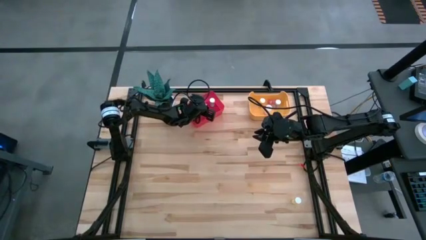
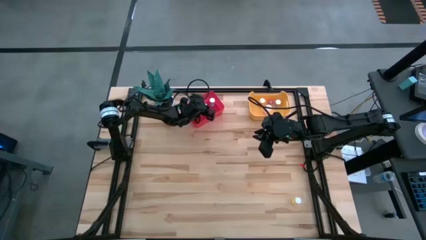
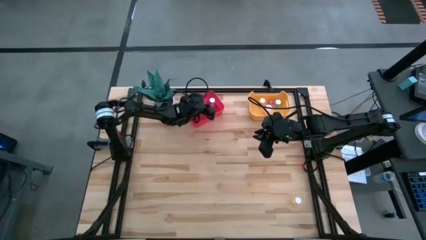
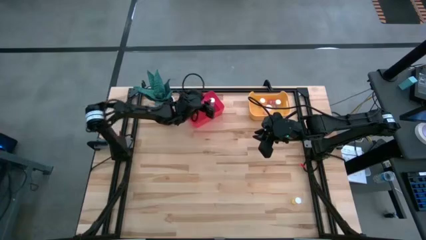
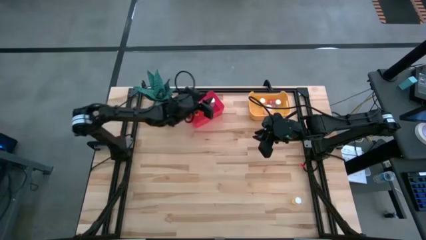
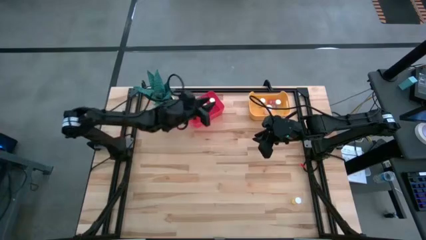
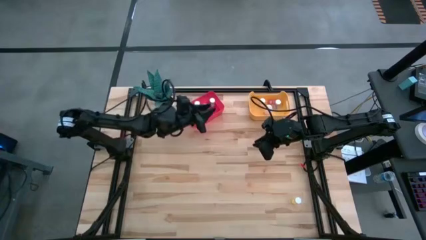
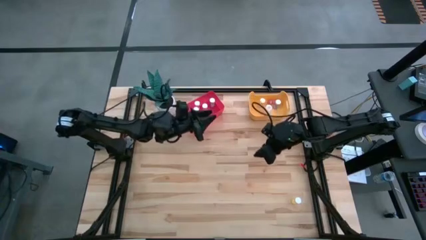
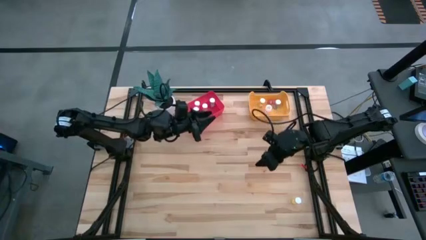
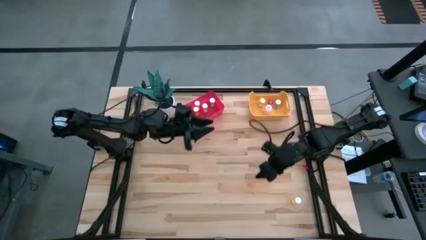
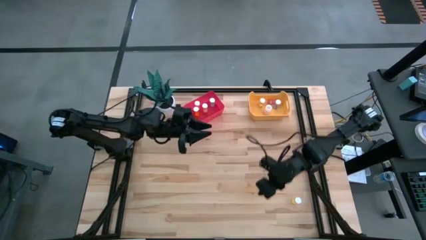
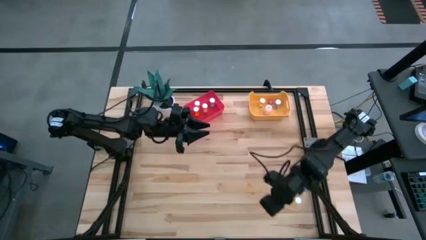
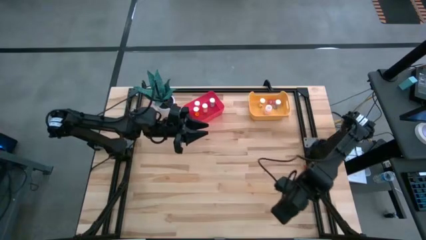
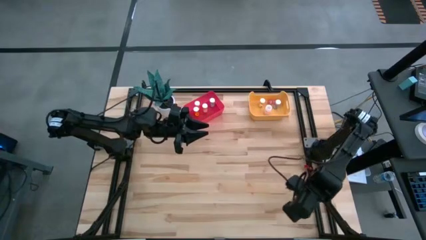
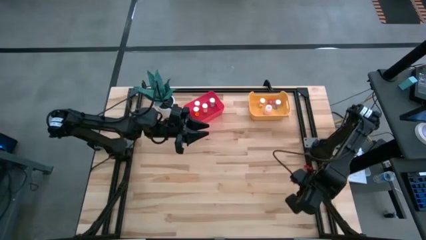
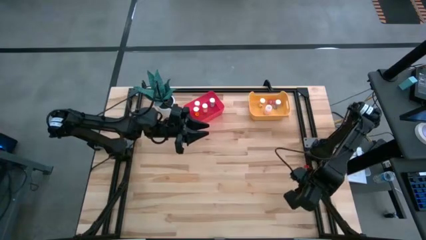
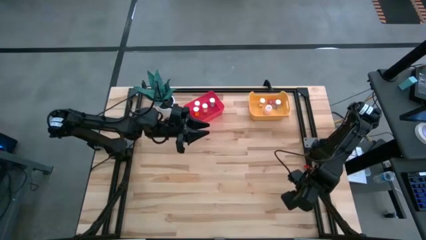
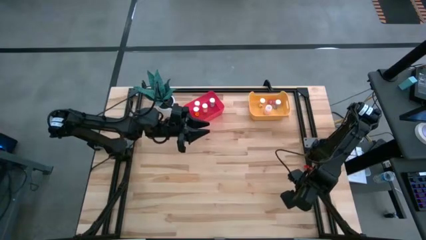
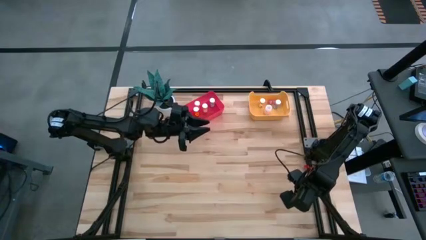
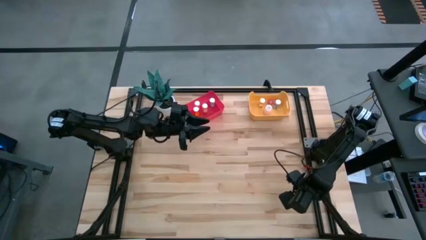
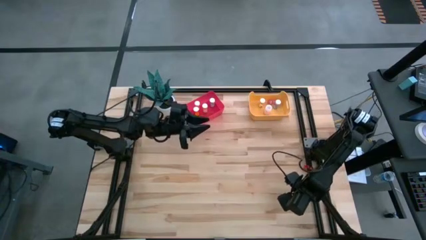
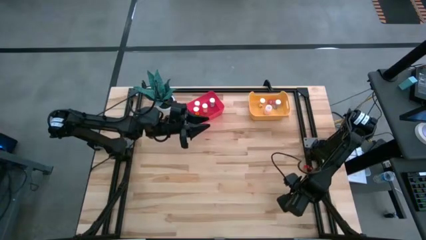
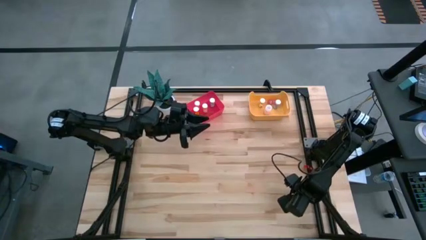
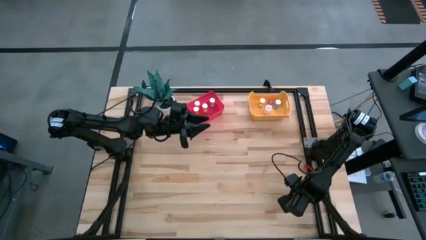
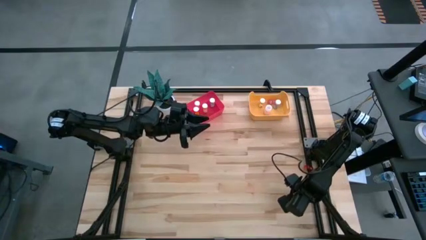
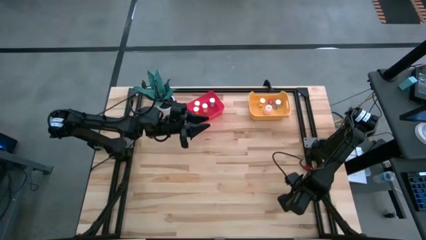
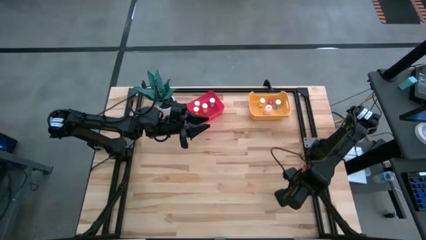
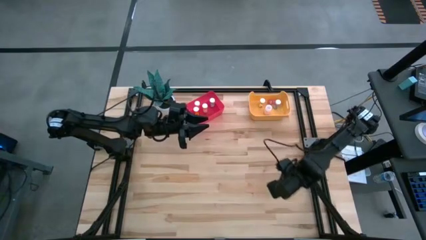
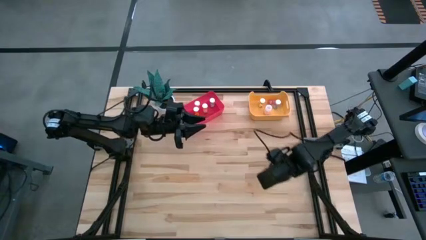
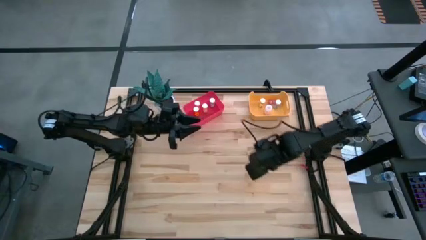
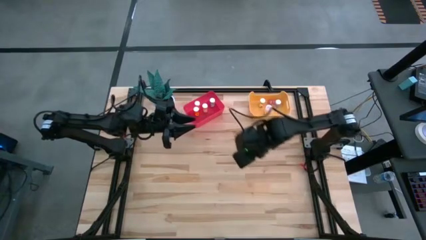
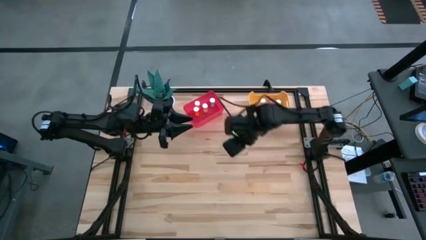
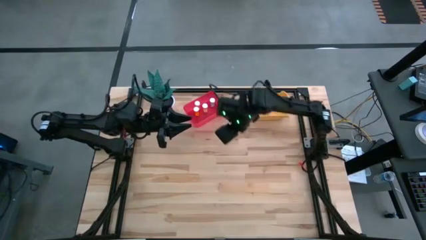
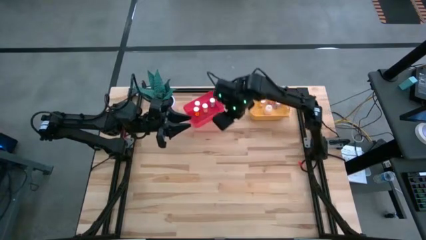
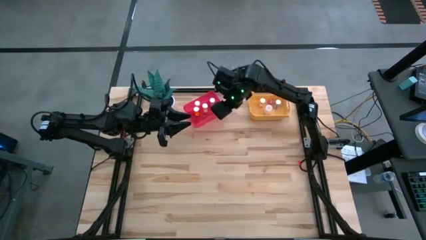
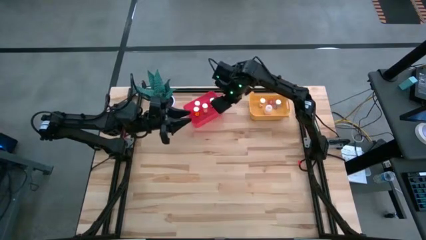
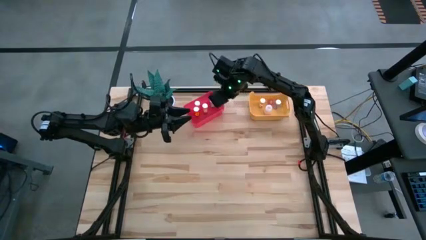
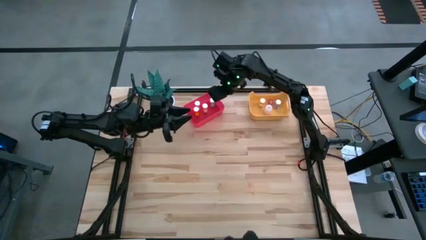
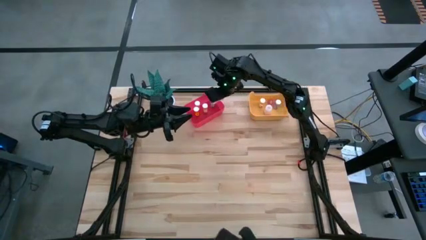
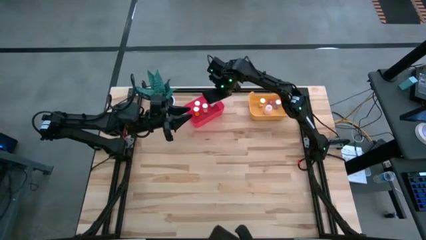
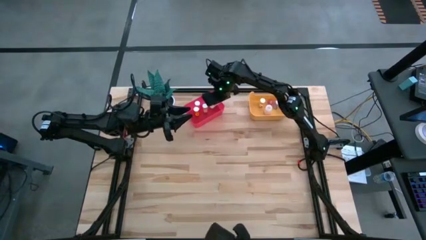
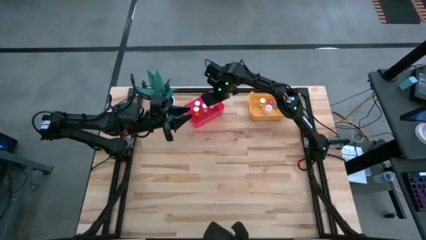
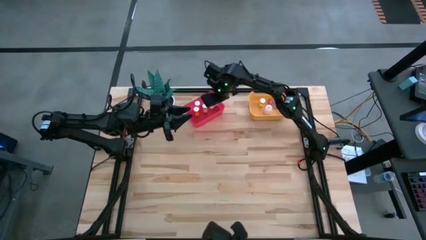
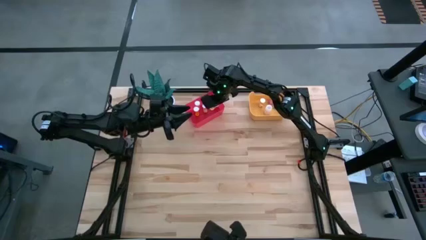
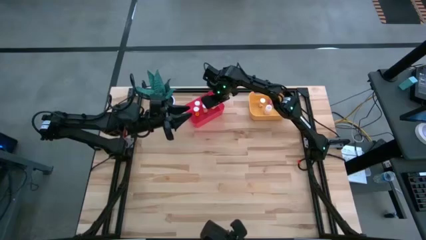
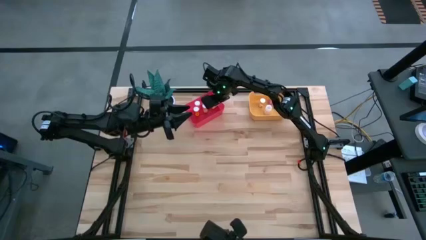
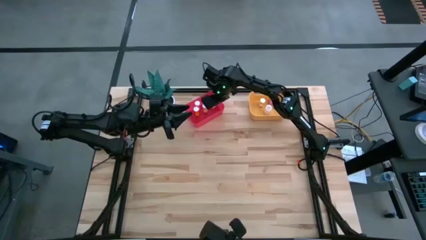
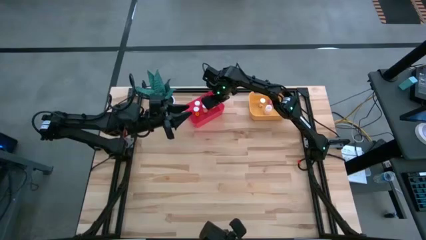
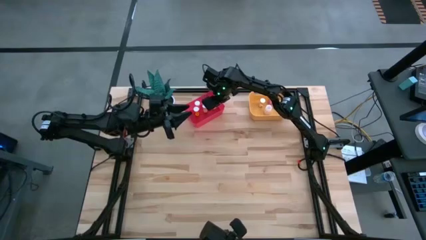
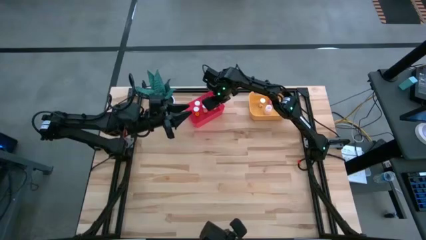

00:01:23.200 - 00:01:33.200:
Task: Pick and place medicine bottles into bin by pill shape (circle, oval)
Put the yellow tablet bottle into the pink bin

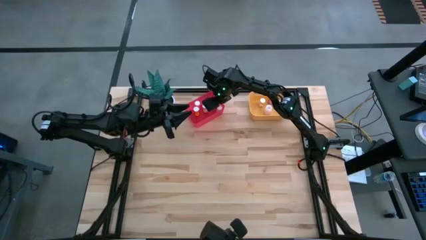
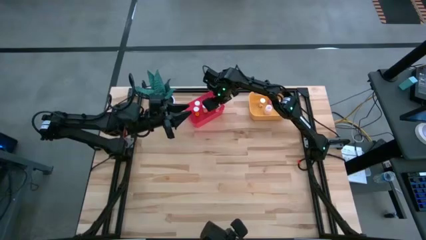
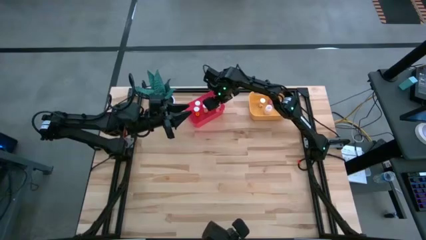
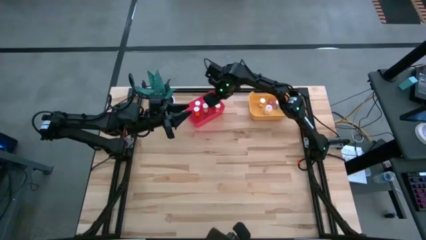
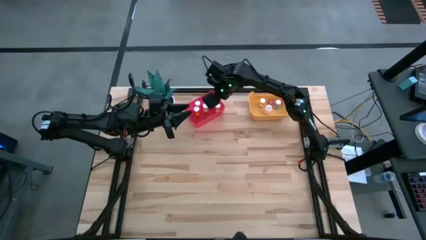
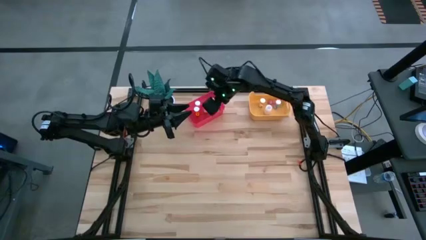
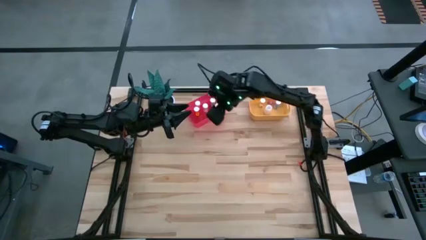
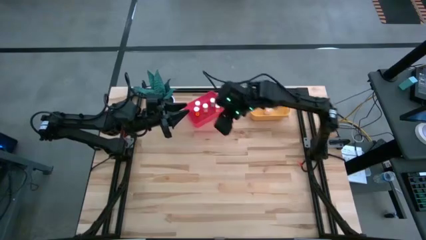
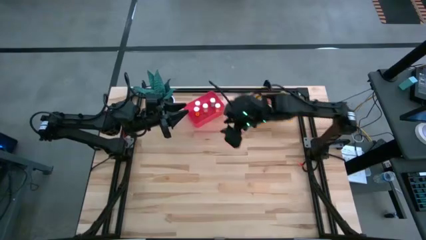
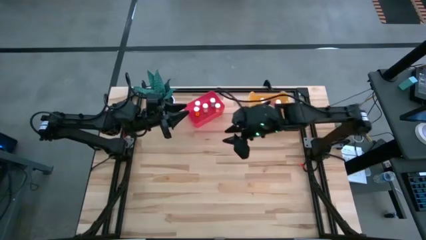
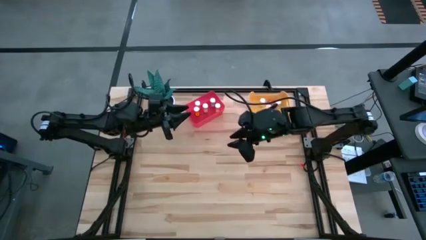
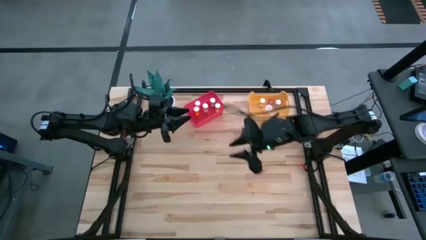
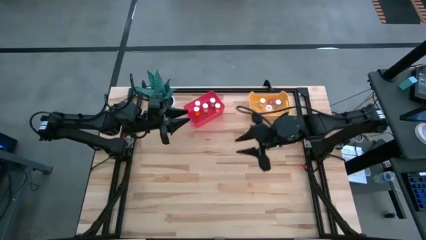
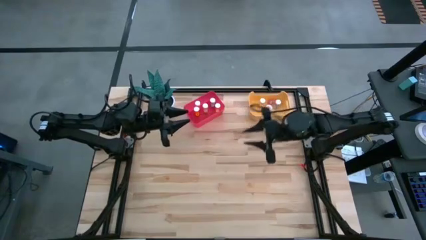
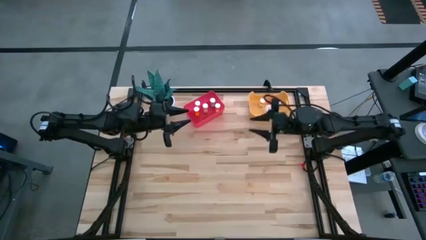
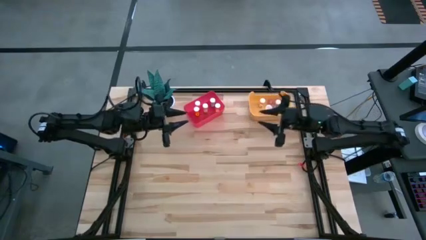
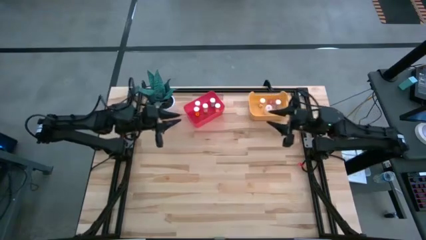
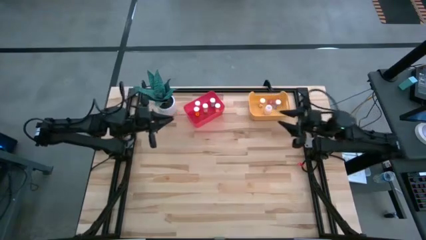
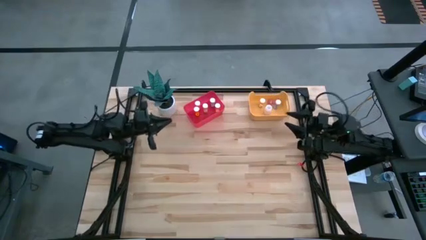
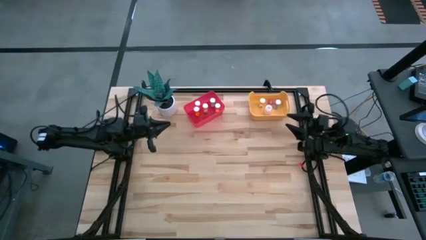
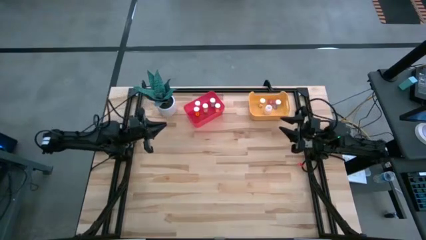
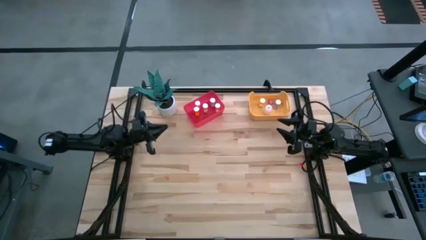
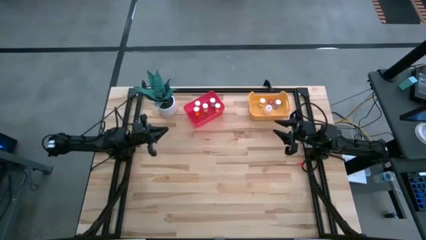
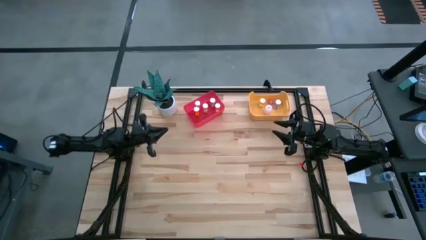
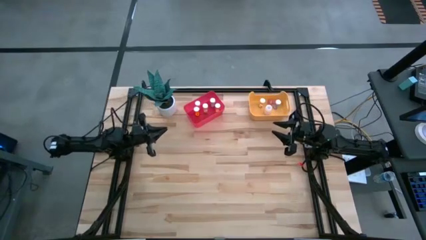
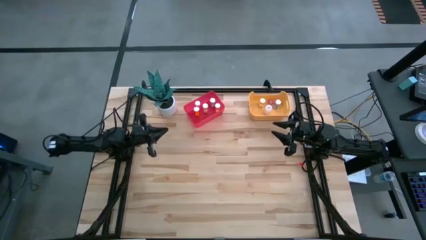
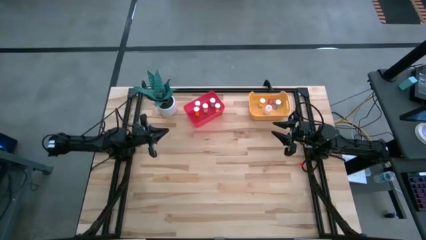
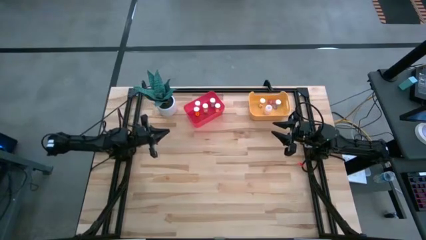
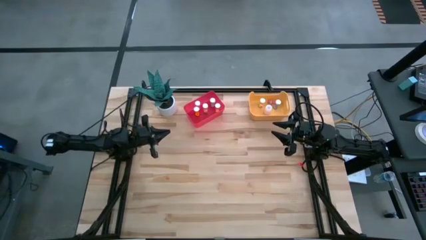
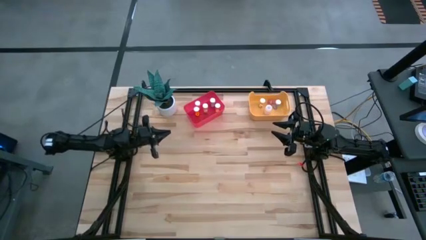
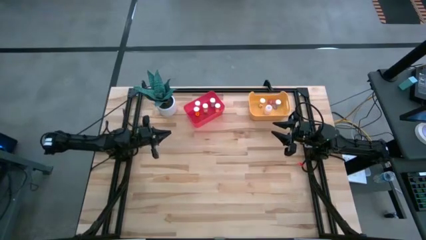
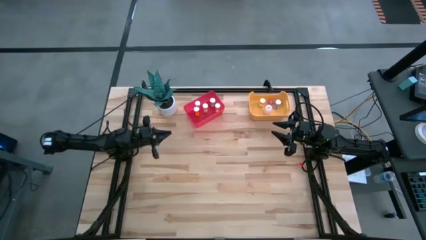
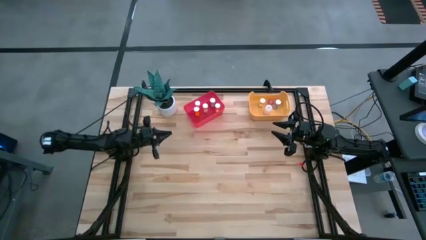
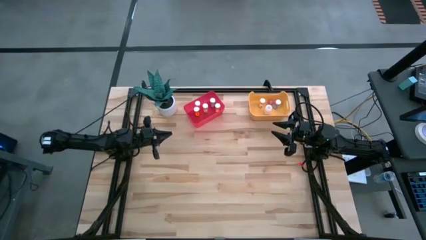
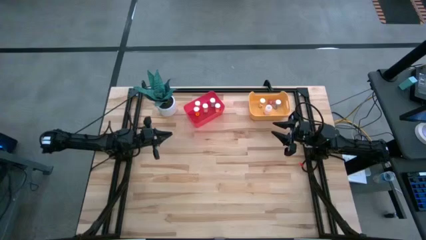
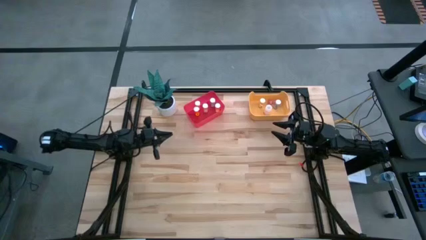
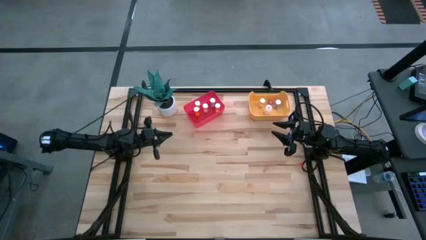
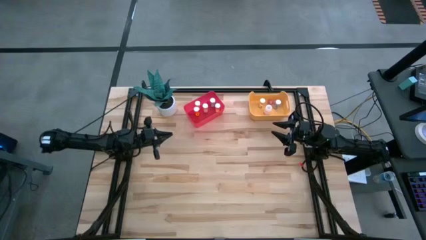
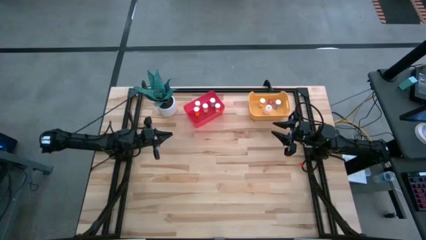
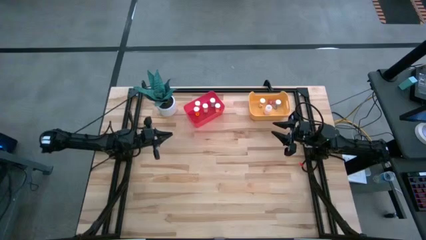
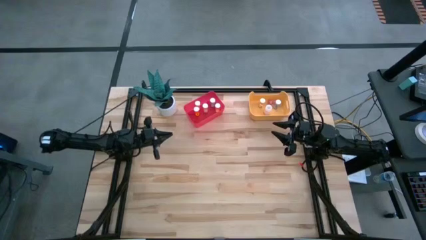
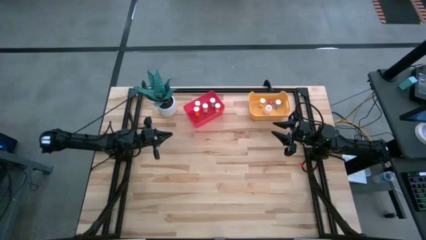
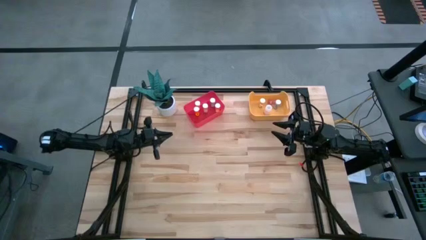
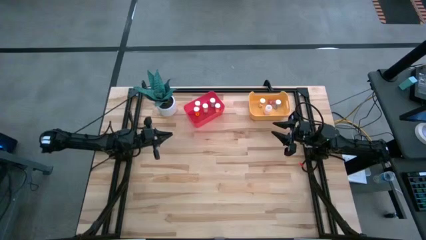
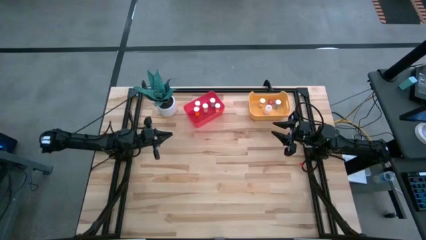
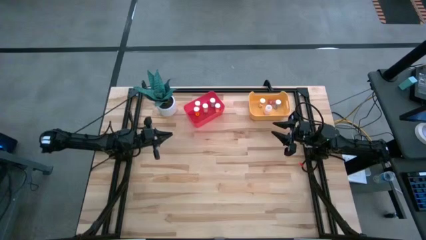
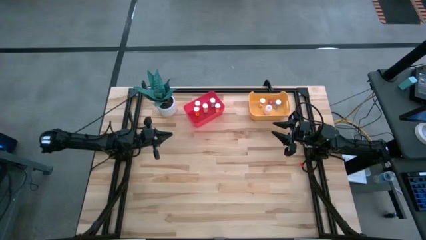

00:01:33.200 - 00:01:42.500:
Return to Home Position
